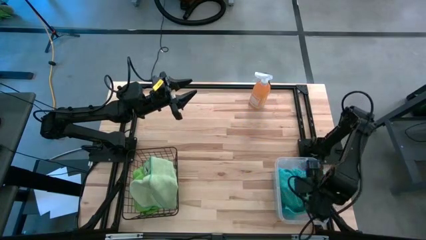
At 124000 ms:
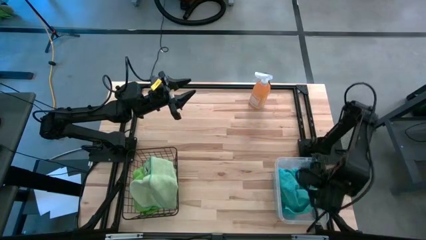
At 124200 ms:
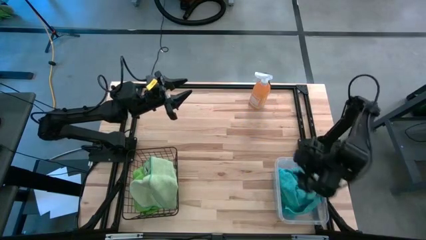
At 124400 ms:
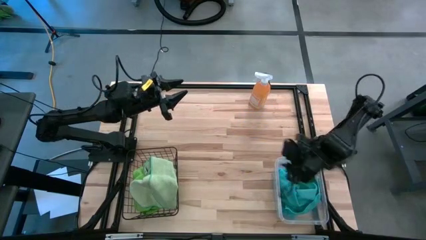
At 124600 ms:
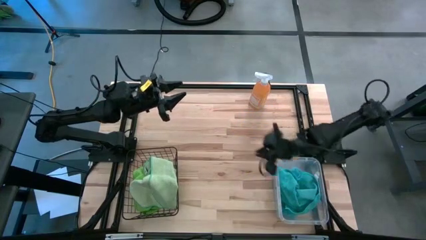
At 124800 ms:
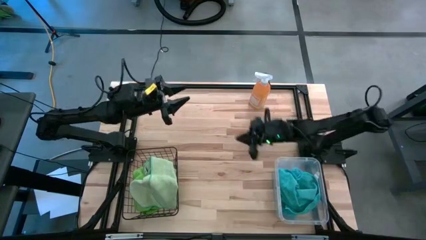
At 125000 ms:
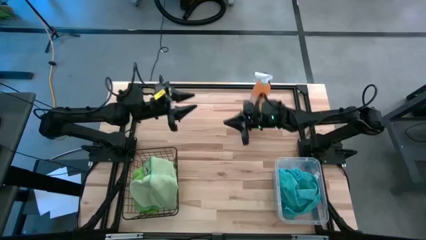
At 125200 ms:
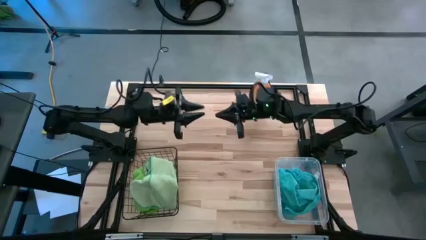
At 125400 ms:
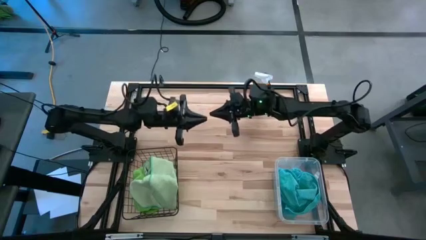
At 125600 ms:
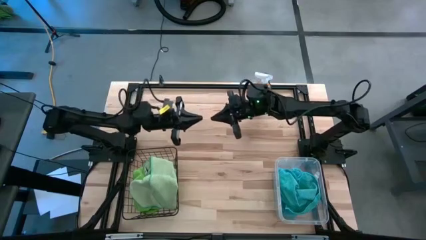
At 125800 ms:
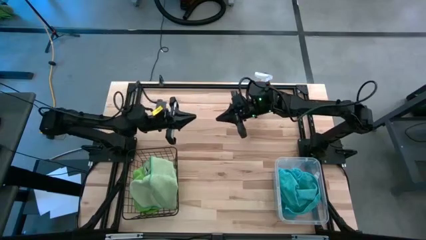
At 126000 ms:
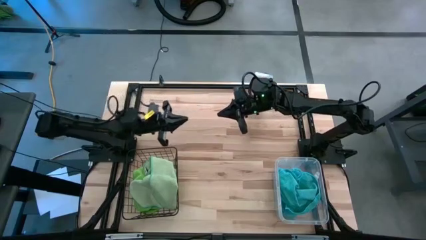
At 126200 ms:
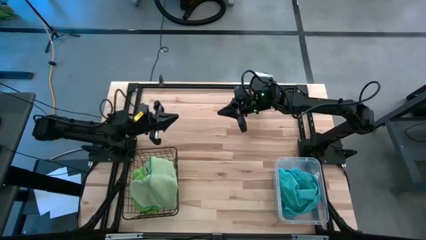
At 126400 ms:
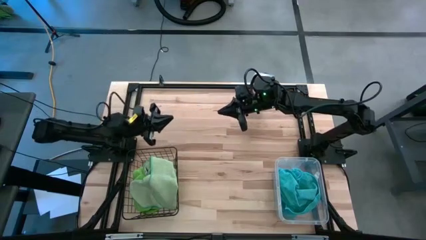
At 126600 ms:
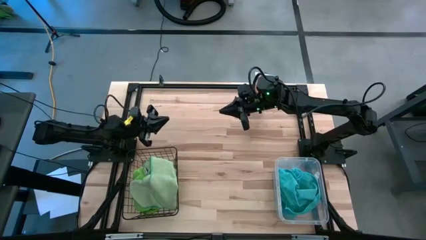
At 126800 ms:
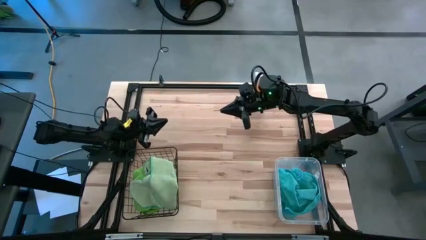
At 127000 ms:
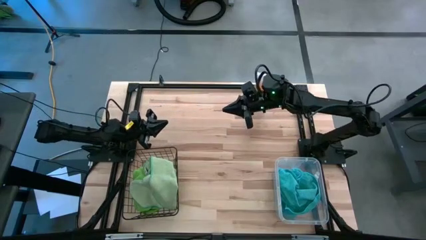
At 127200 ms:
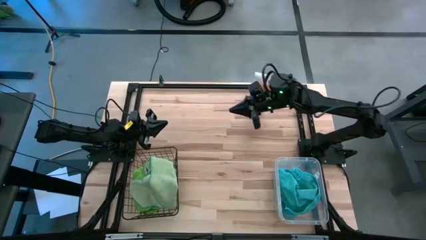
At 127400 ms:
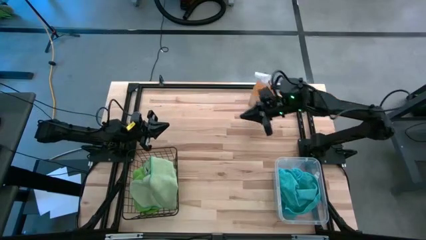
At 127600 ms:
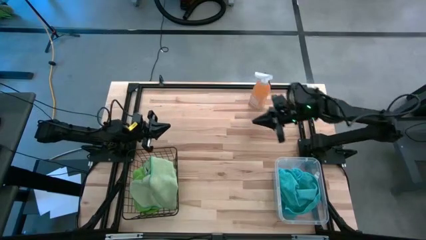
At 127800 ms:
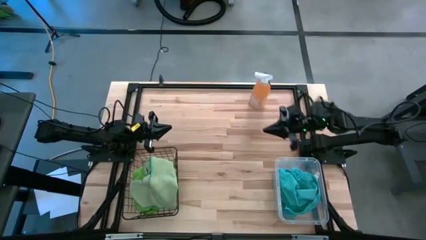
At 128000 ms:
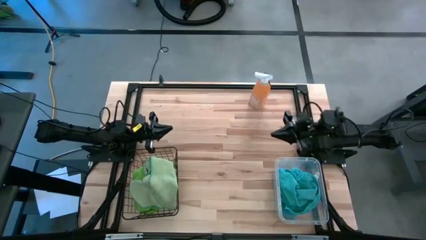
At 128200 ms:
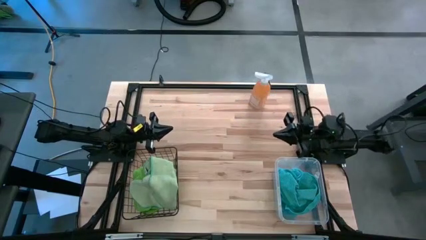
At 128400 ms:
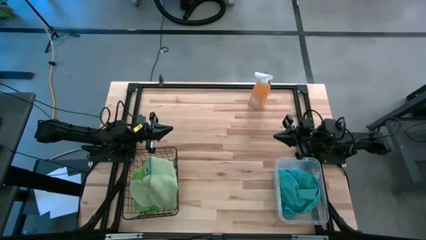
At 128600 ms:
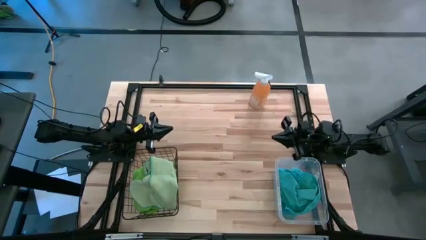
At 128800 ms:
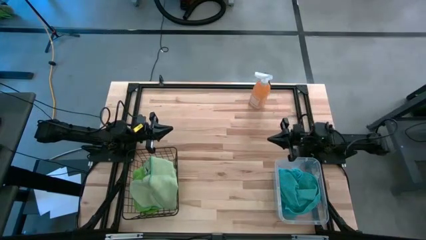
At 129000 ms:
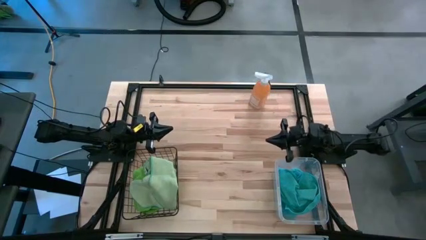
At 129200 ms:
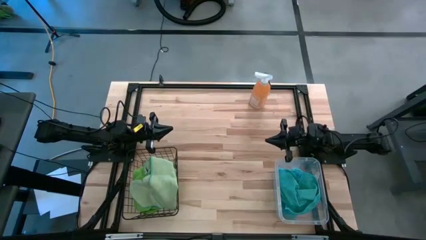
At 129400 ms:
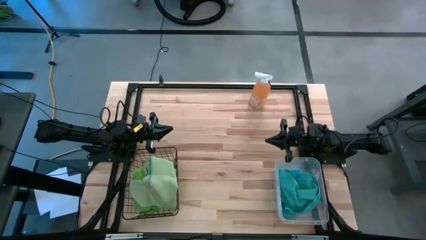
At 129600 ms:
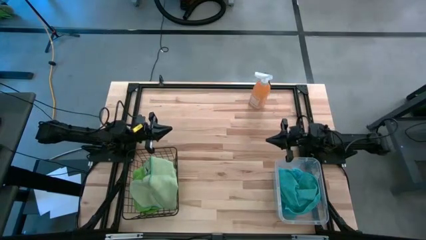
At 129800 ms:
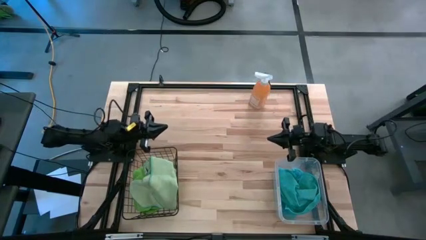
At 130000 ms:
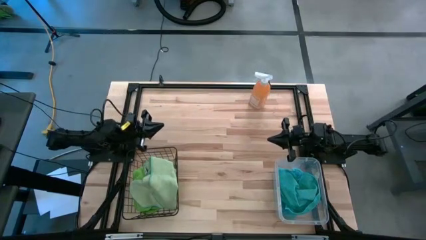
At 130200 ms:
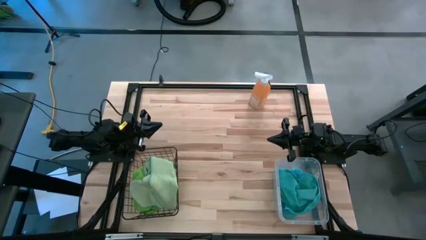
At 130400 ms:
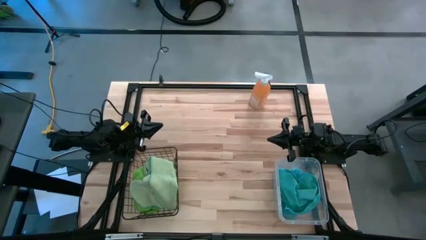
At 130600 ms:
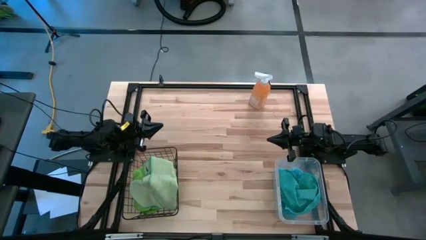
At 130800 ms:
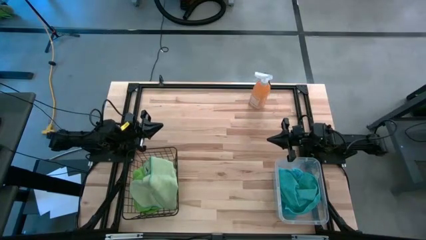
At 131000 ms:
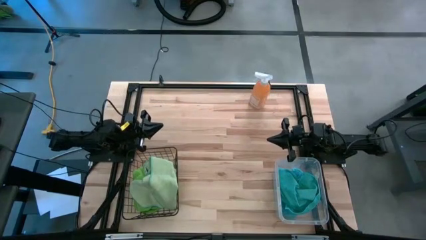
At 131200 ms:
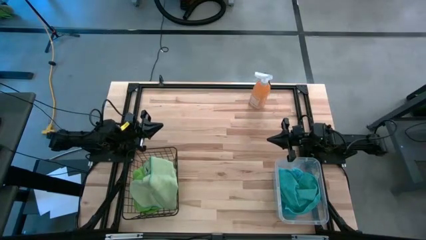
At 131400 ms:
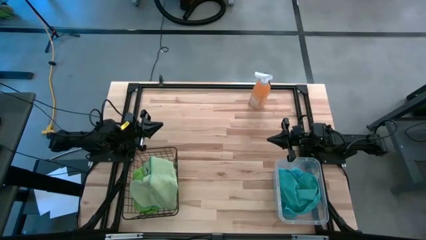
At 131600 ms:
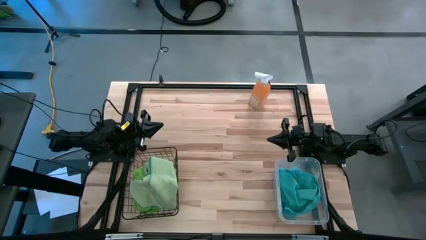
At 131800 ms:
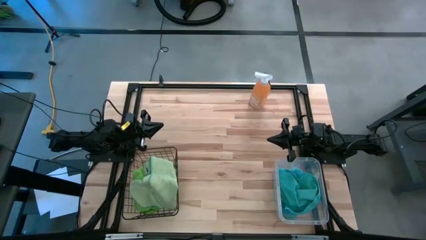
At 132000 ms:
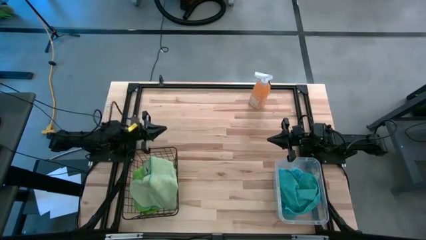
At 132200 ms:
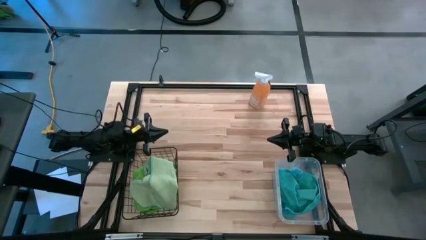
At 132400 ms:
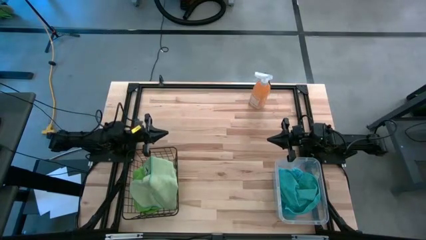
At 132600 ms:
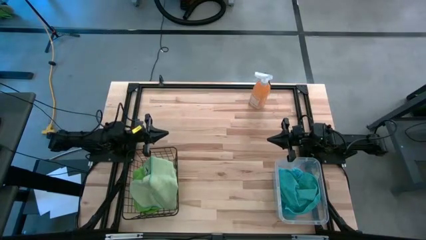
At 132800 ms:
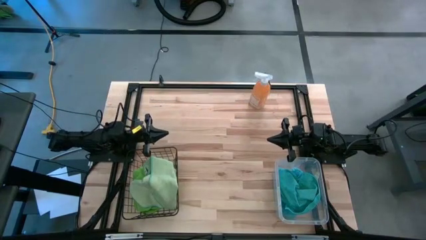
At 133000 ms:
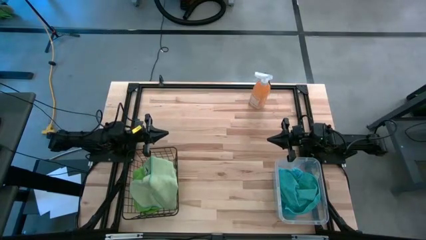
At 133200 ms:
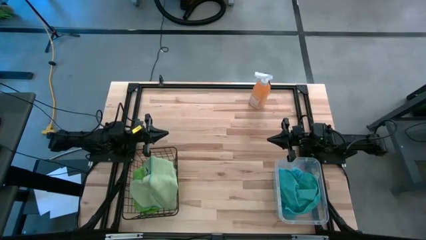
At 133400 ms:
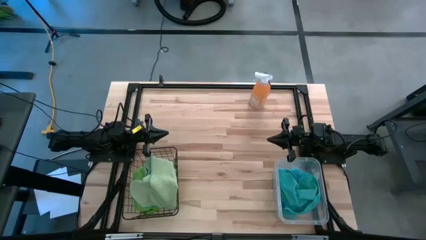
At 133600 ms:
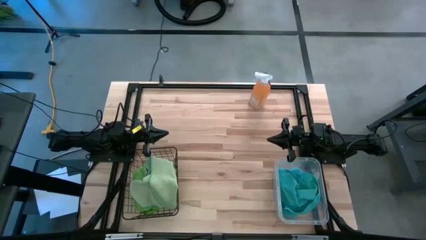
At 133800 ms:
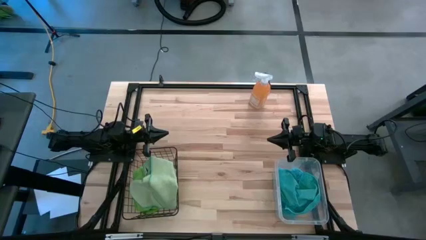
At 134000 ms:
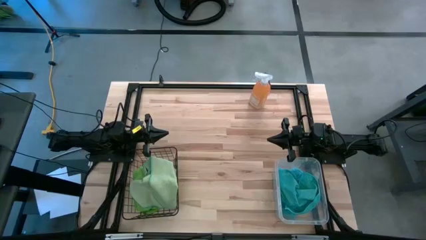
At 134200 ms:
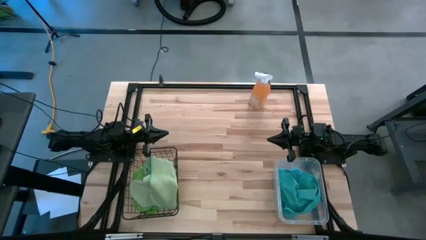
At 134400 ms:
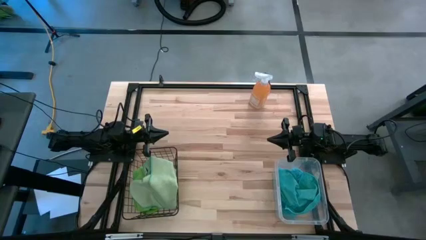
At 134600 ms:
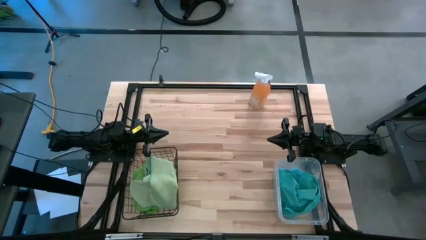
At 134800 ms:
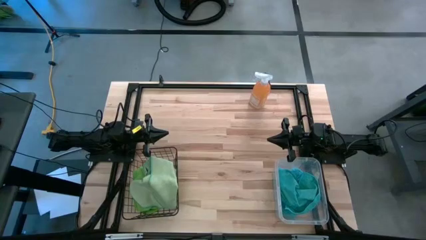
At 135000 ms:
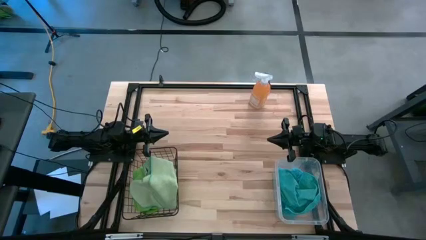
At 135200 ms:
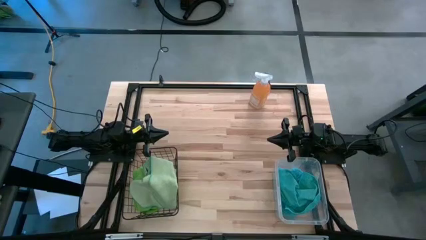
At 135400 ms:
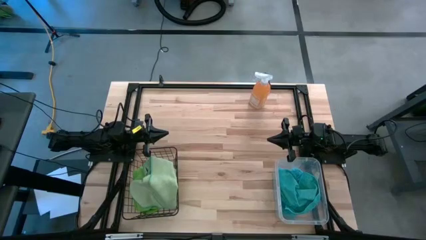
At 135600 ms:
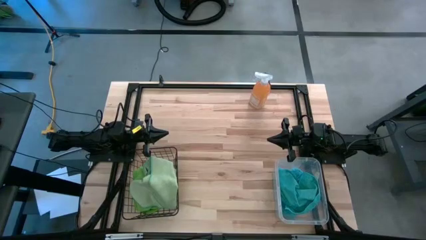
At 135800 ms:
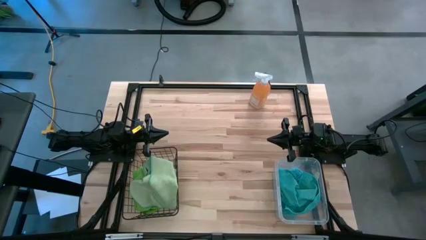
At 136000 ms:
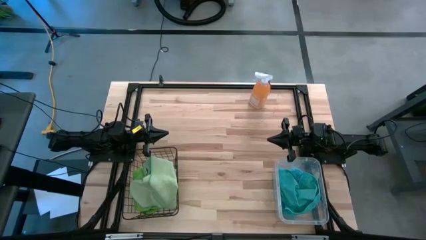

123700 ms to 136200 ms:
Task: Sort microfiber towel by color & place in baskets
Return to Home Position
